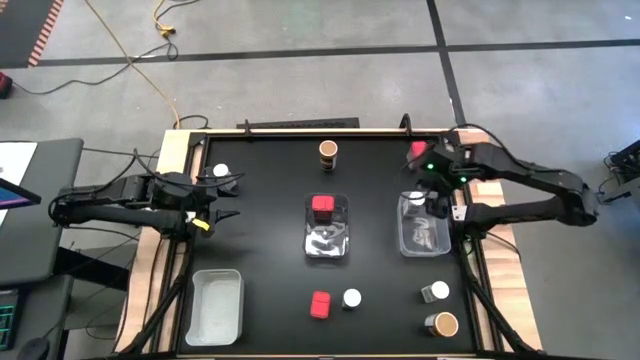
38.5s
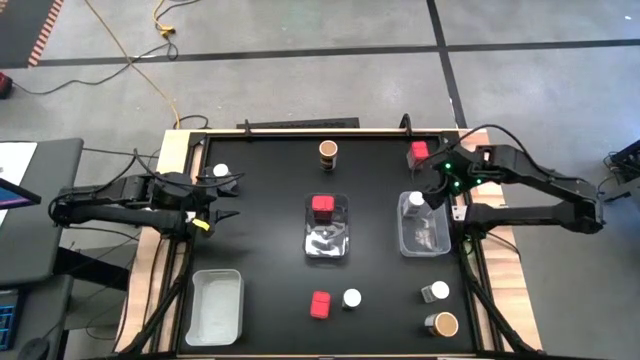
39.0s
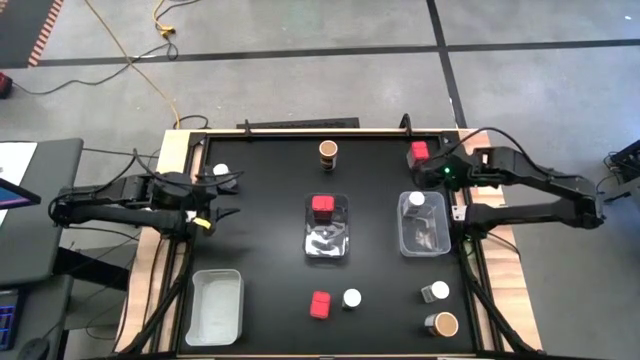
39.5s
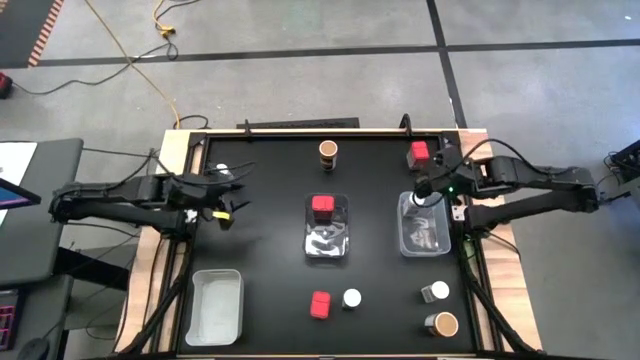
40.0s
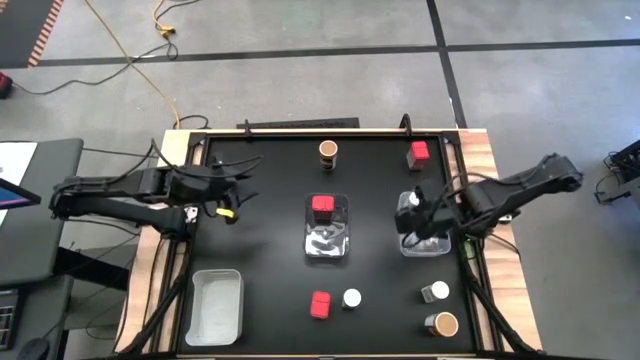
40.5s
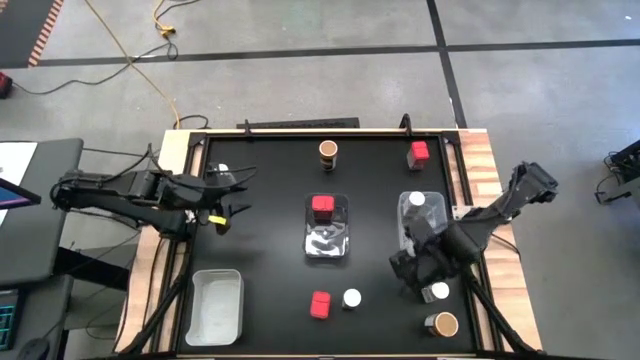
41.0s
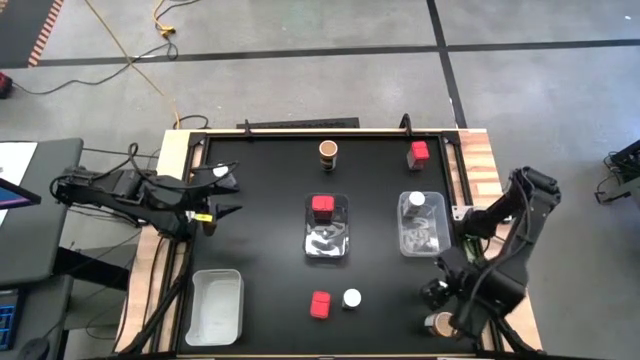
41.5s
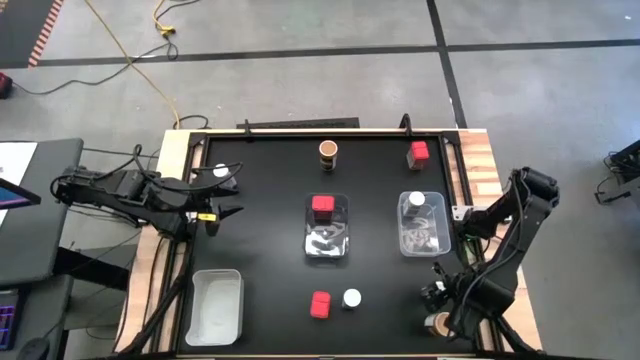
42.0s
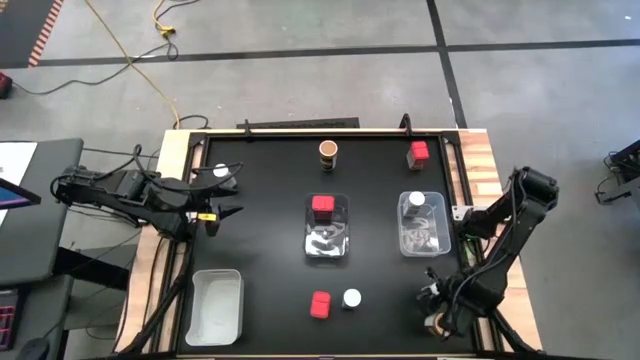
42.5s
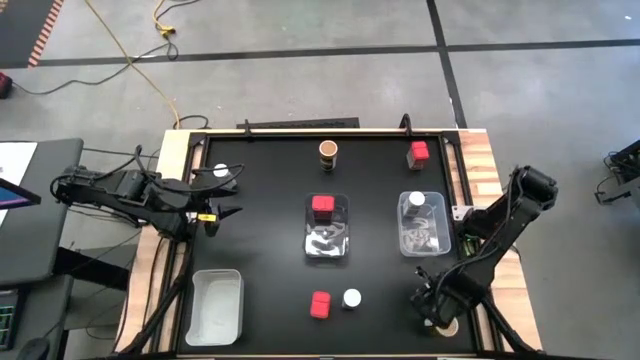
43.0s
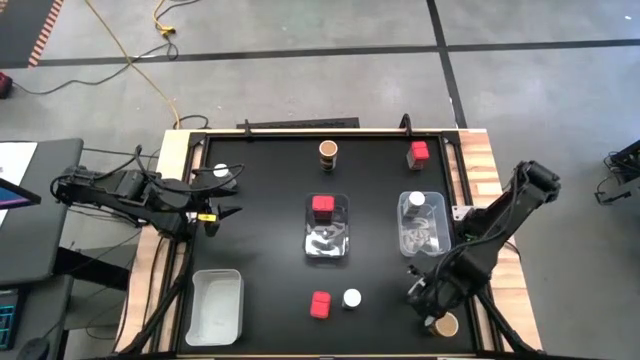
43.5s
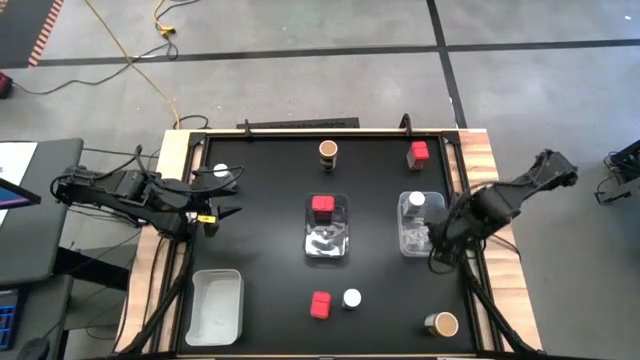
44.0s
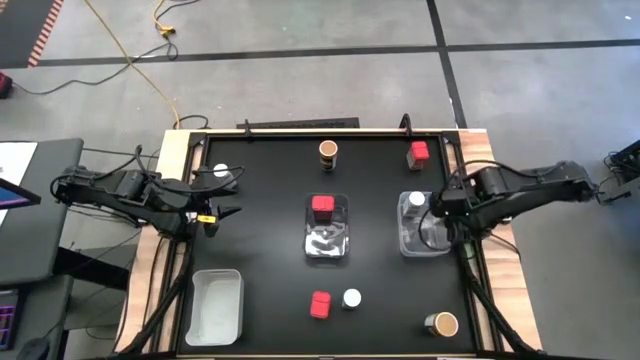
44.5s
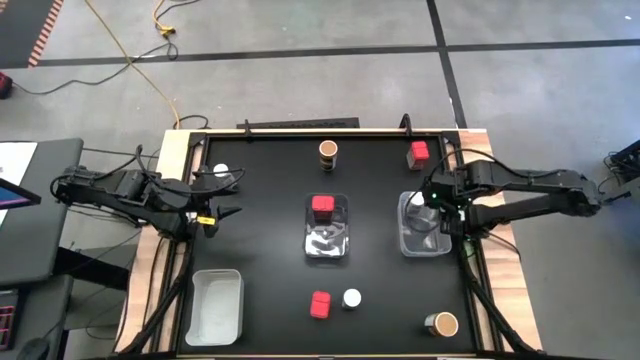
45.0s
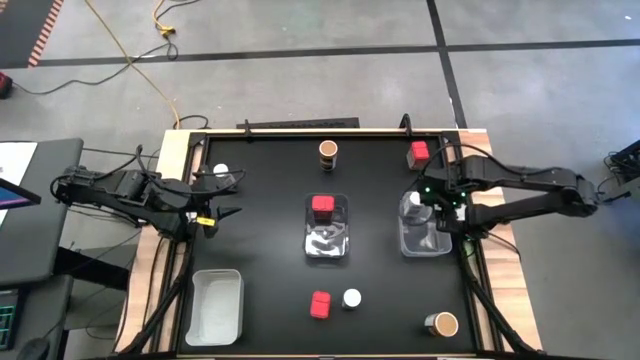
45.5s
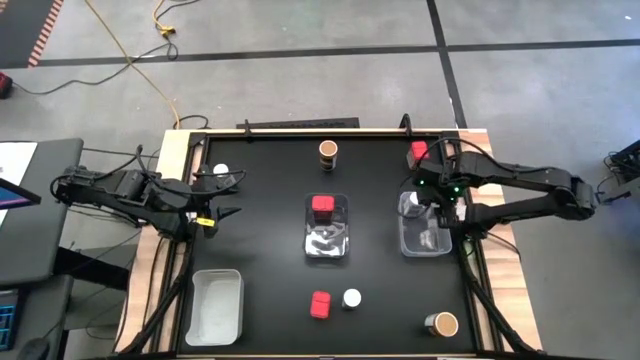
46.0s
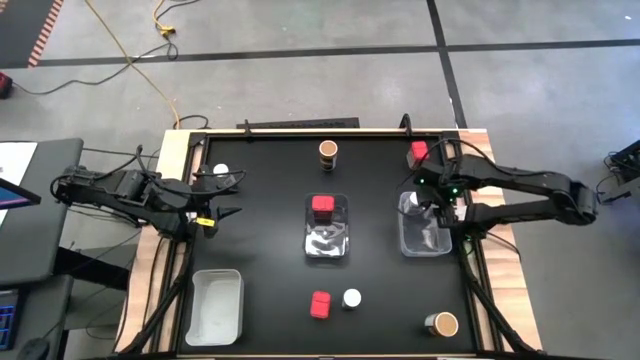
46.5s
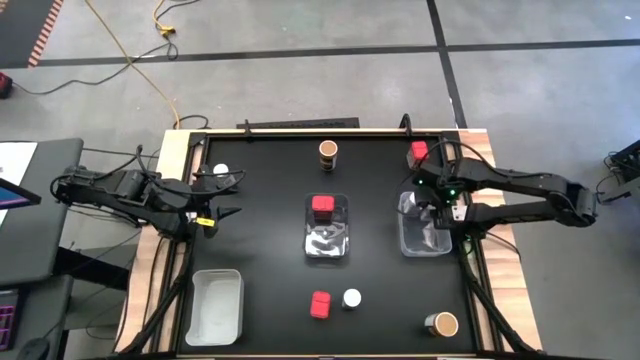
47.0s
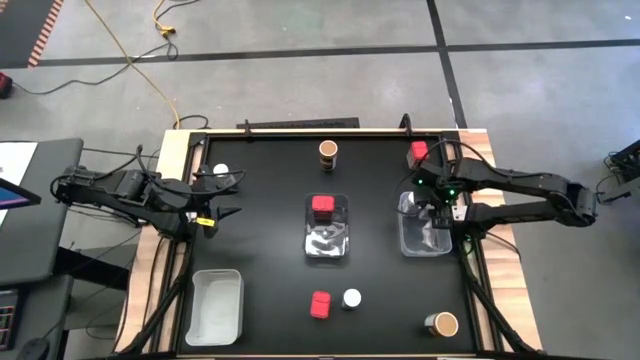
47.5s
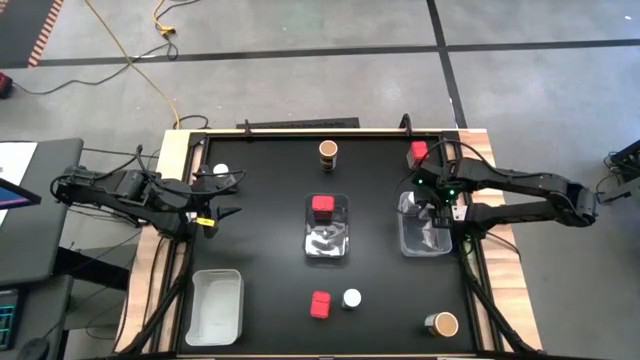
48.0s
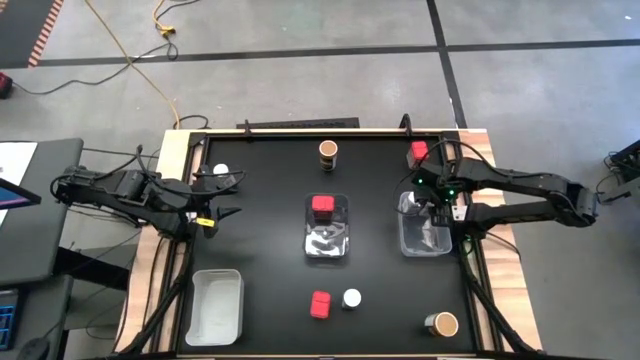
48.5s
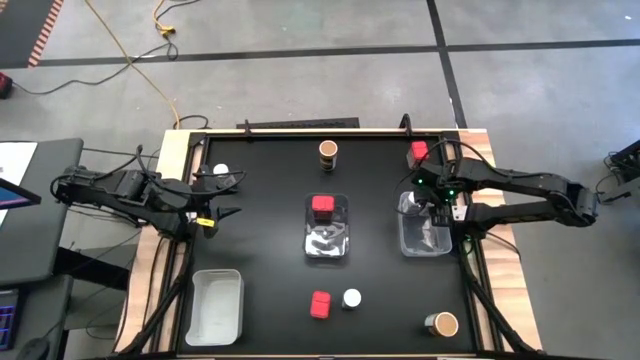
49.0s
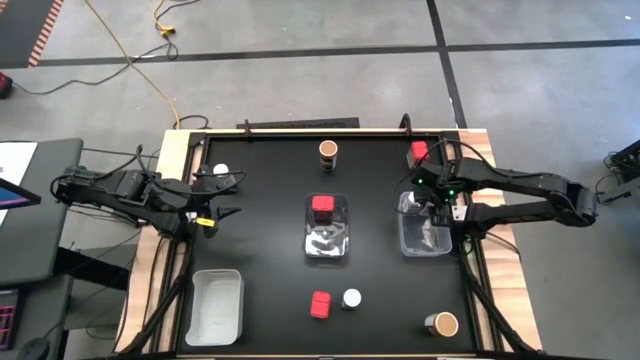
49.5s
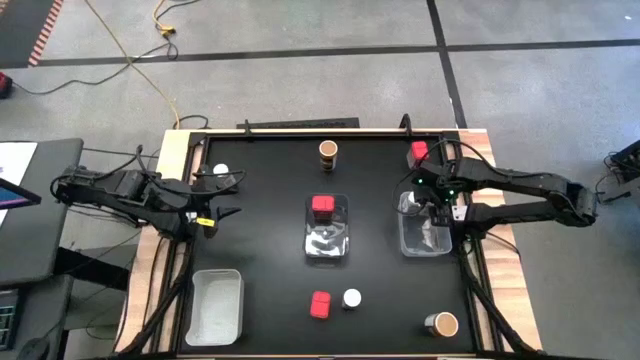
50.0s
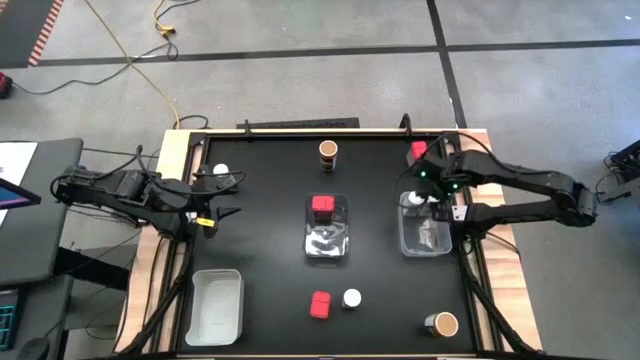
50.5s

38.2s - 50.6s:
Task: Sort spices by type
Put the white seasoning bottle into the transparent bin

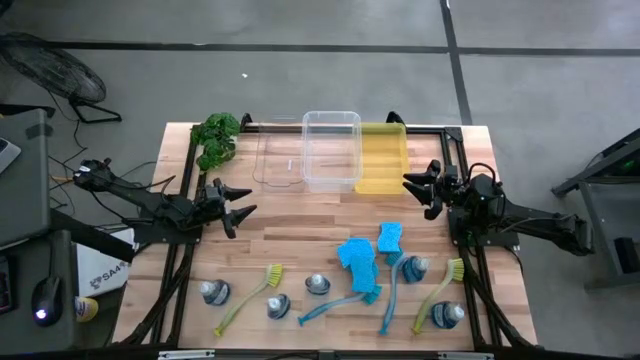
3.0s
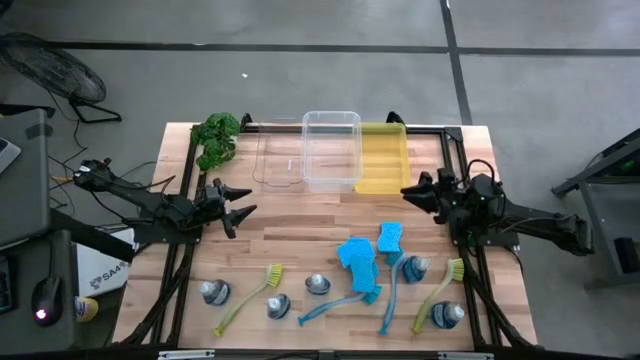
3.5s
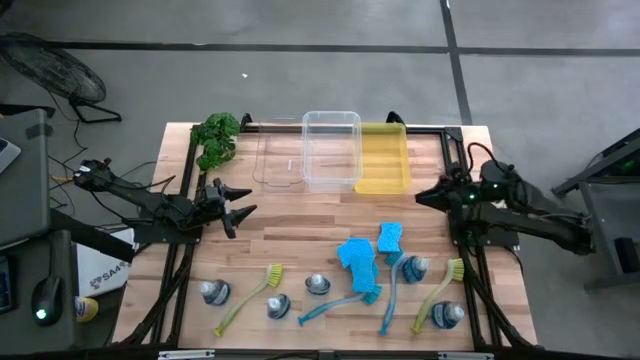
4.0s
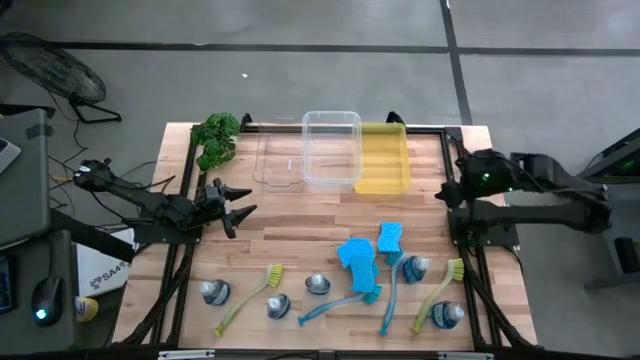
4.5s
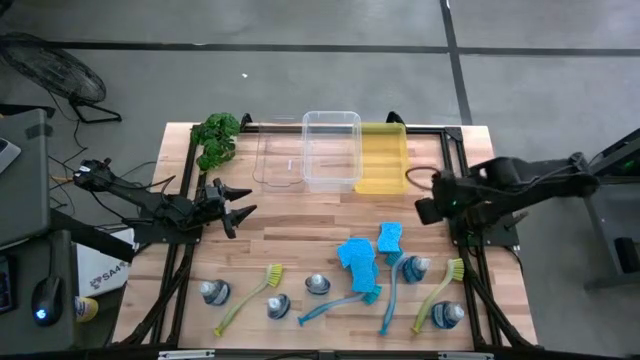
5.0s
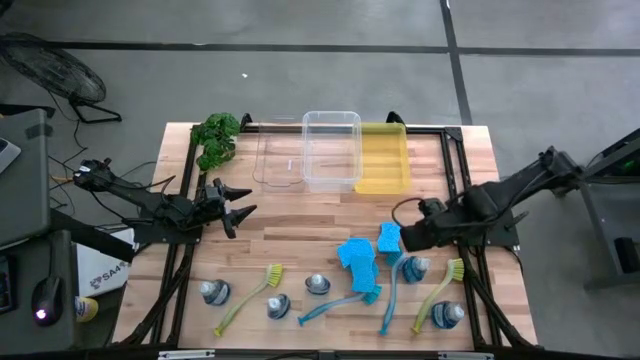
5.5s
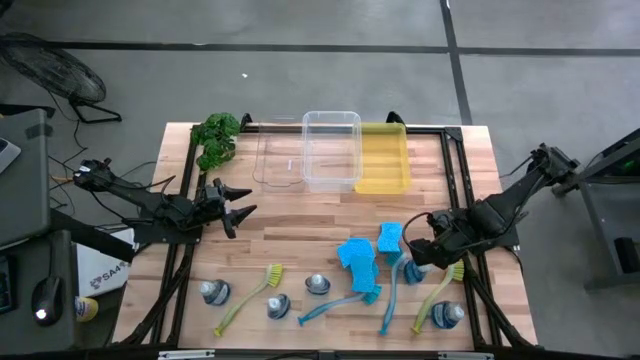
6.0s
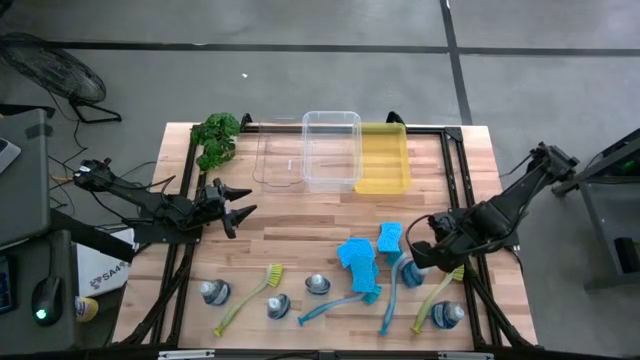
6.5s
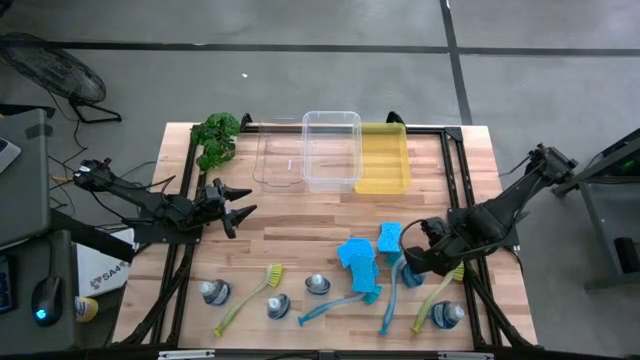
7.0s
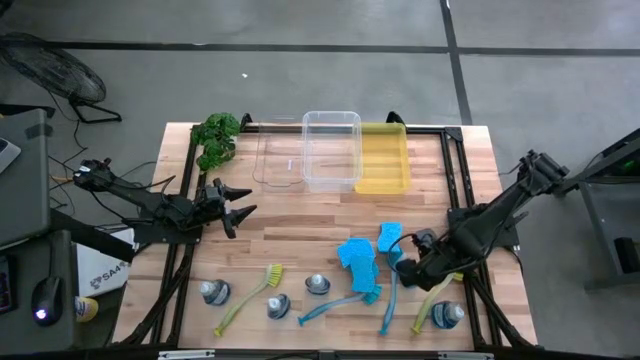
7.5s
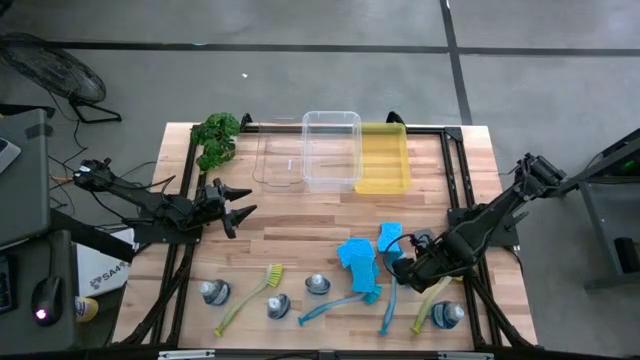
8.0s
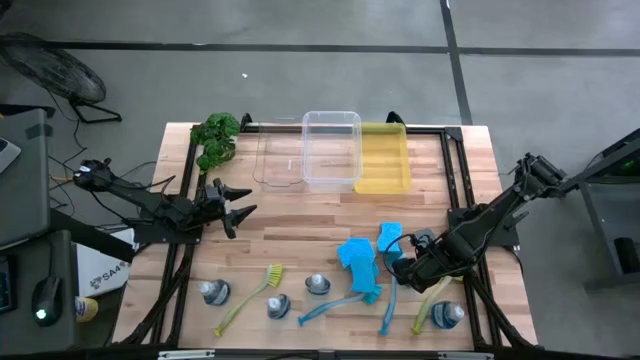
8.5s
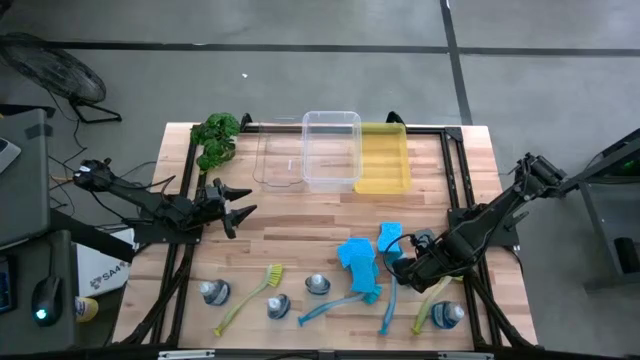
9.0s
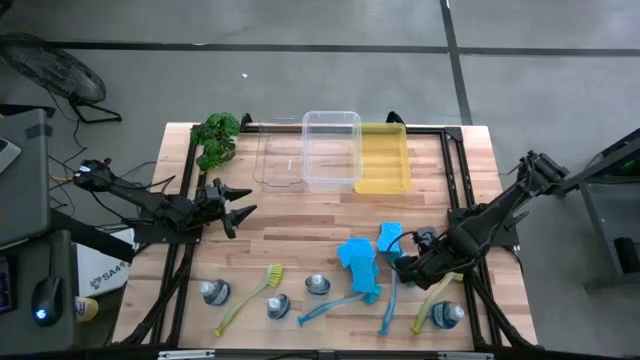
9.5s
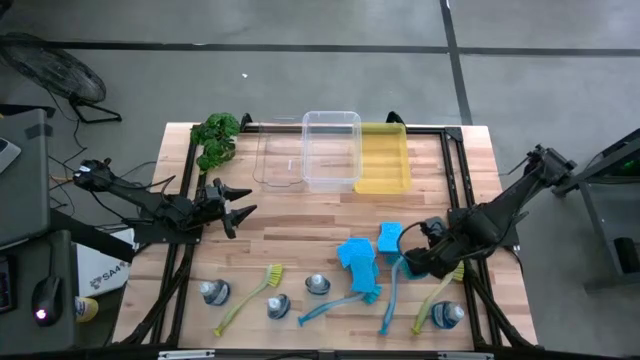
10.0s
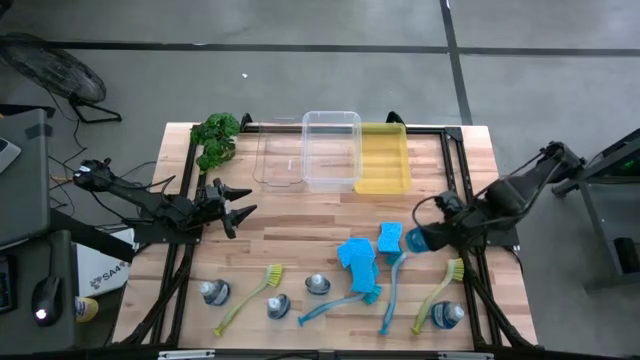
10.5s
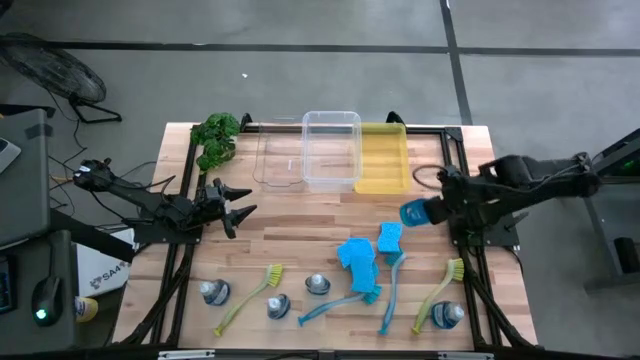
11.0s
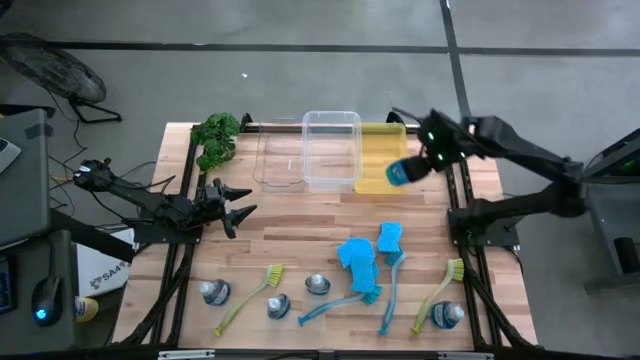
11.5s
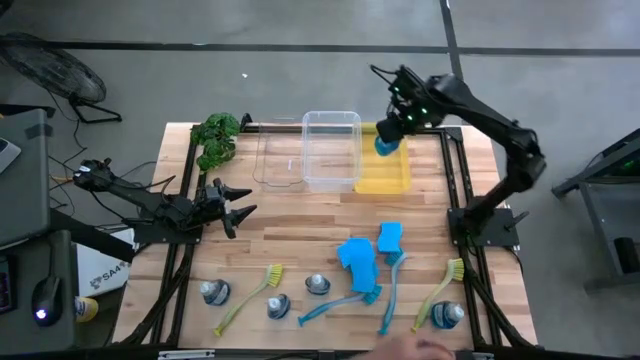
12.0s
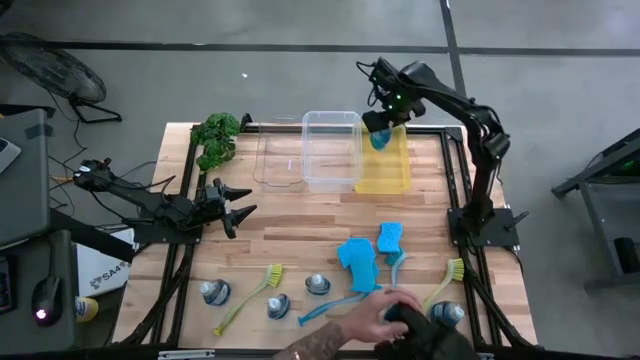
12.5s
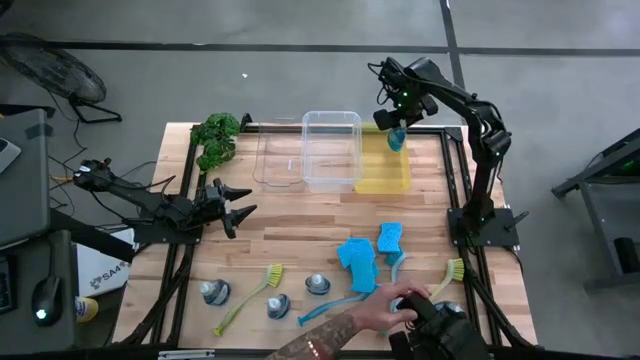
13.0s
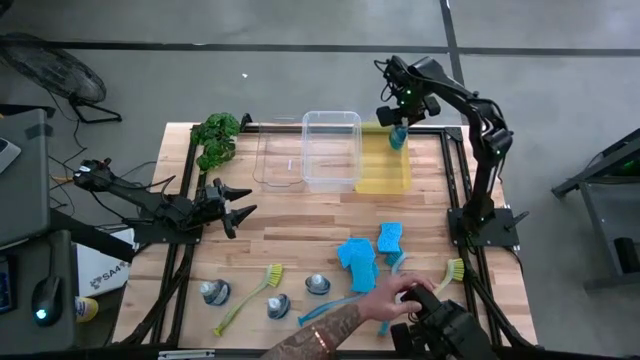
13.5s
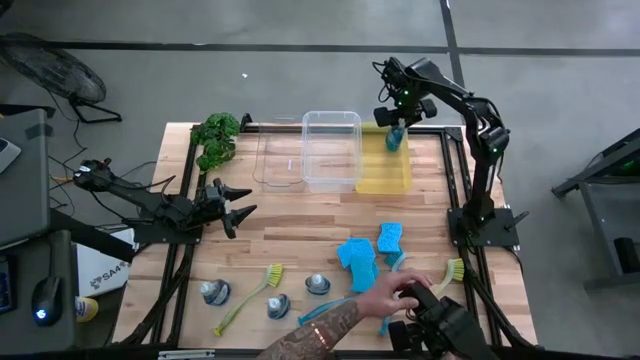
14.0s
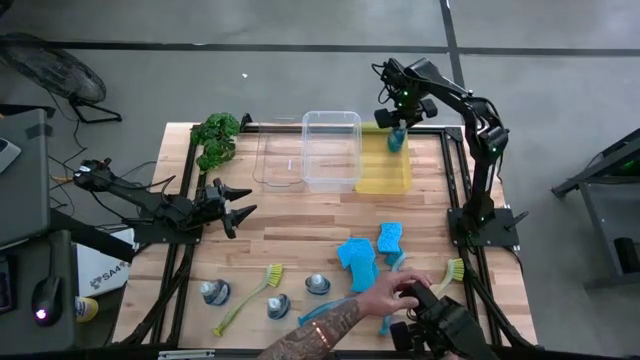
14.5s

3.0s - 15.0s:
Task: Pick & Place Kitchen Sink Supplies
Put the dishwashing liquid into the yellow bin
